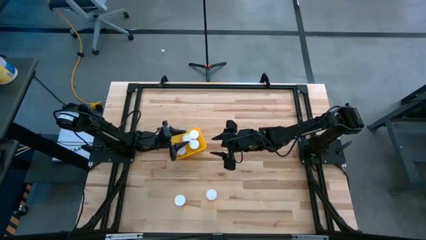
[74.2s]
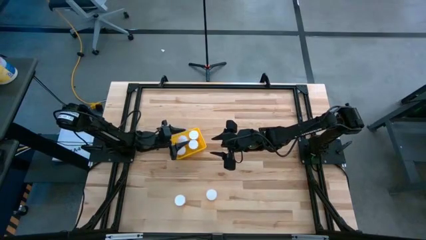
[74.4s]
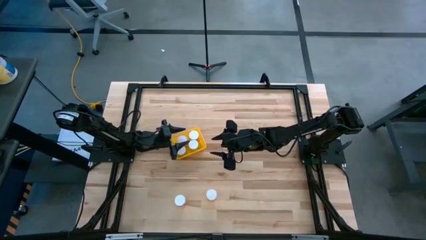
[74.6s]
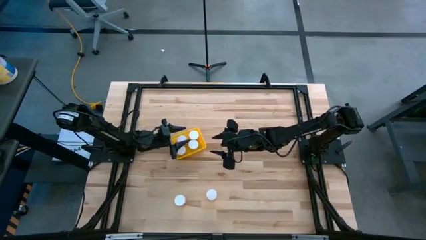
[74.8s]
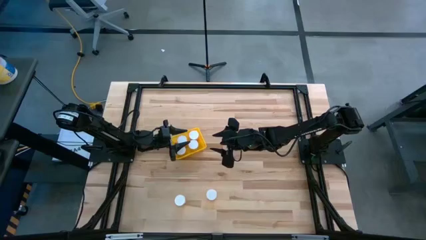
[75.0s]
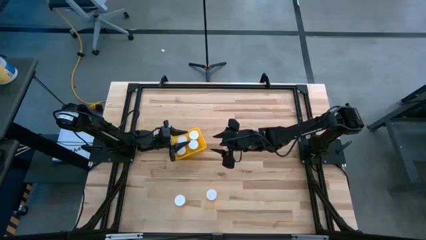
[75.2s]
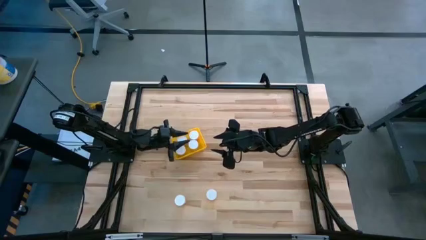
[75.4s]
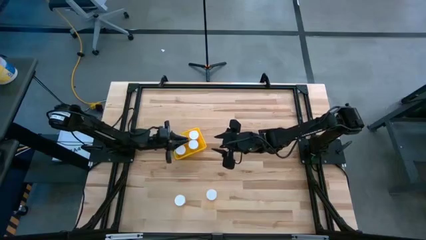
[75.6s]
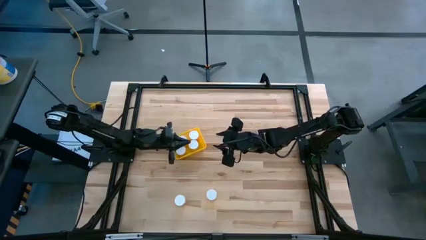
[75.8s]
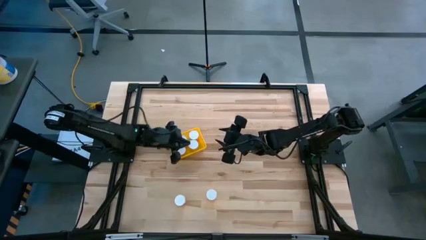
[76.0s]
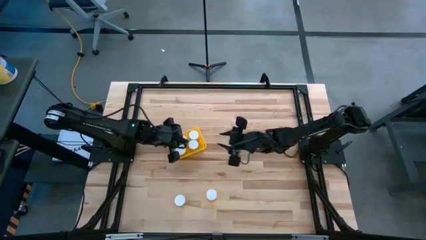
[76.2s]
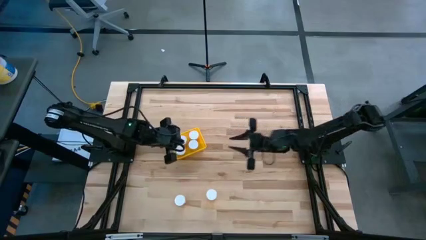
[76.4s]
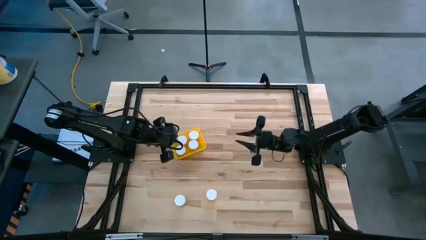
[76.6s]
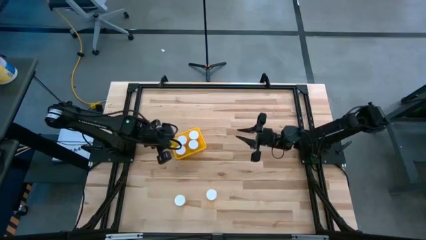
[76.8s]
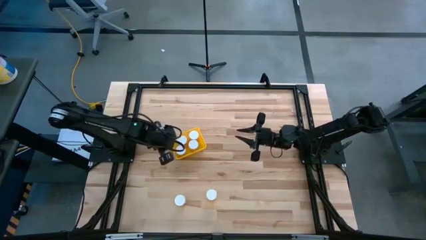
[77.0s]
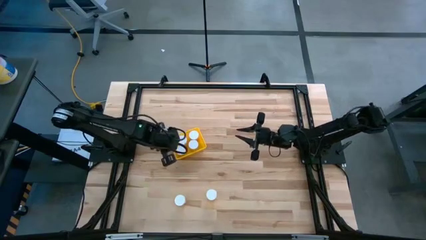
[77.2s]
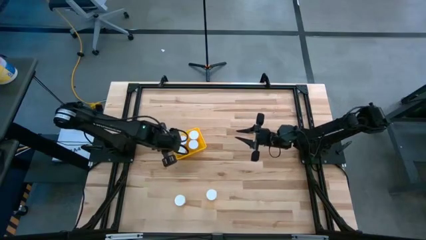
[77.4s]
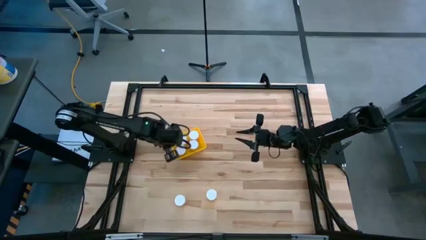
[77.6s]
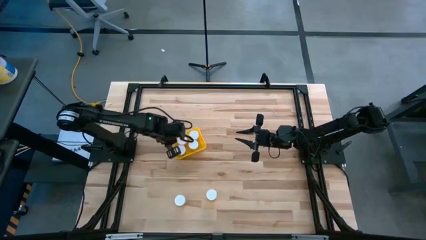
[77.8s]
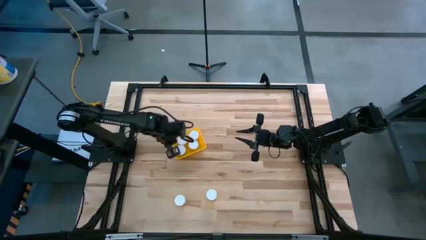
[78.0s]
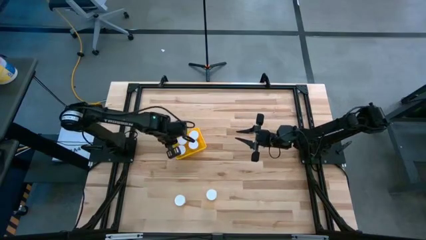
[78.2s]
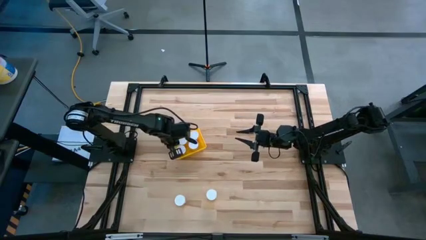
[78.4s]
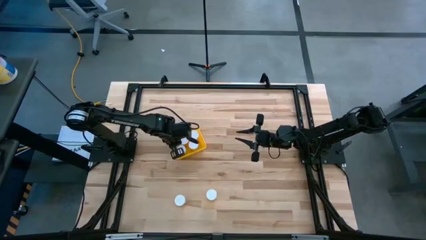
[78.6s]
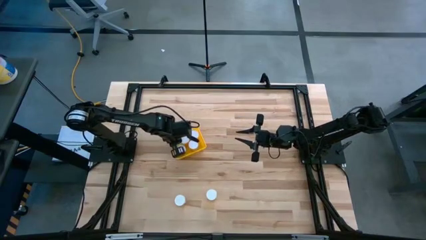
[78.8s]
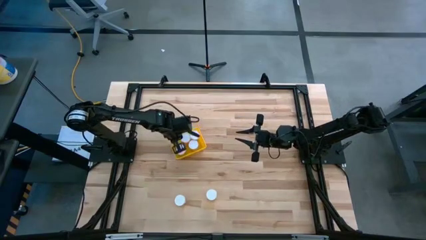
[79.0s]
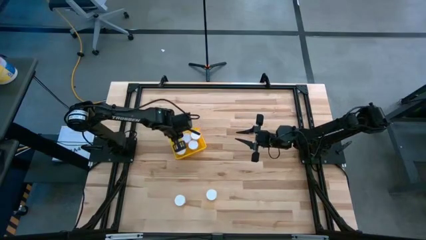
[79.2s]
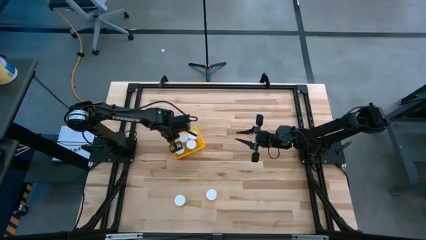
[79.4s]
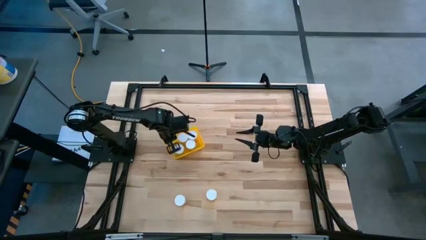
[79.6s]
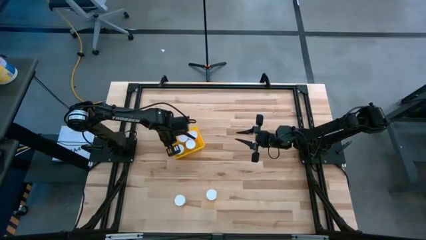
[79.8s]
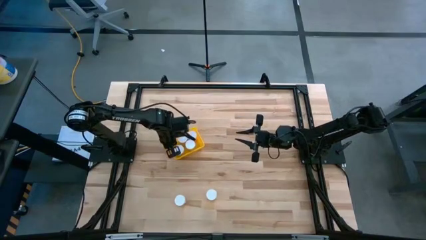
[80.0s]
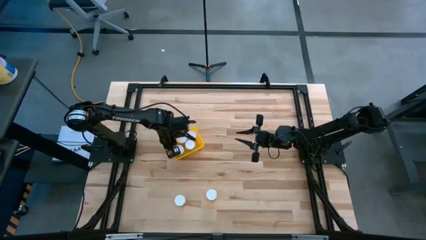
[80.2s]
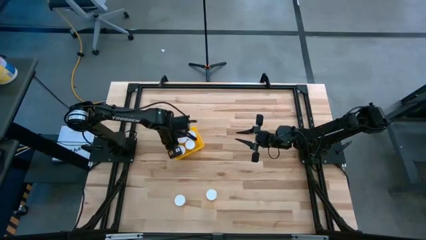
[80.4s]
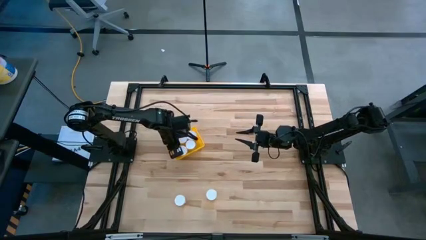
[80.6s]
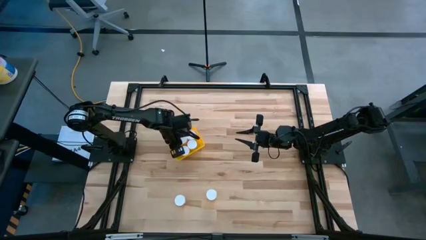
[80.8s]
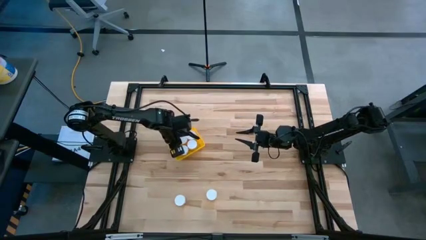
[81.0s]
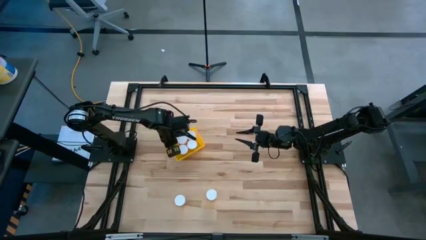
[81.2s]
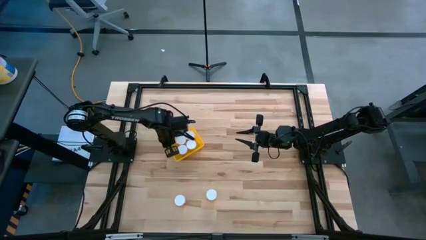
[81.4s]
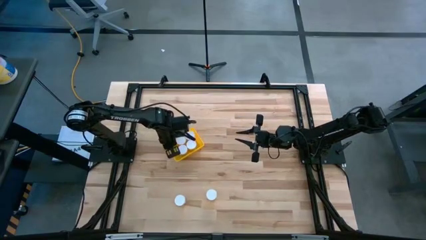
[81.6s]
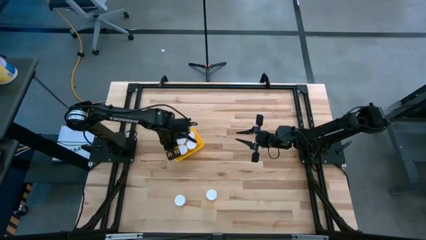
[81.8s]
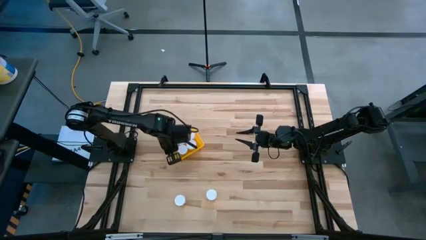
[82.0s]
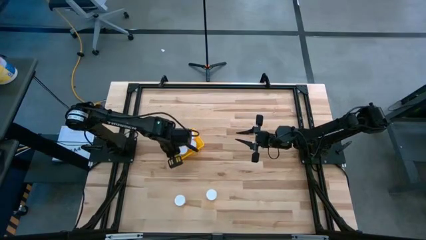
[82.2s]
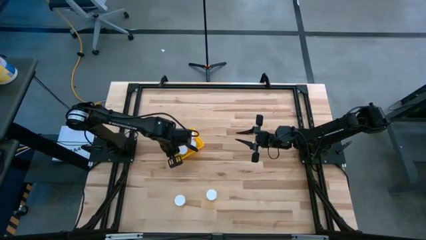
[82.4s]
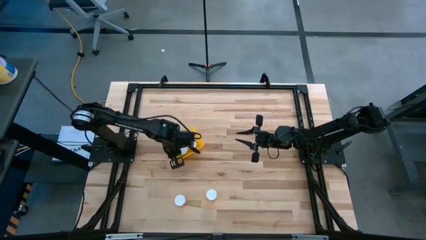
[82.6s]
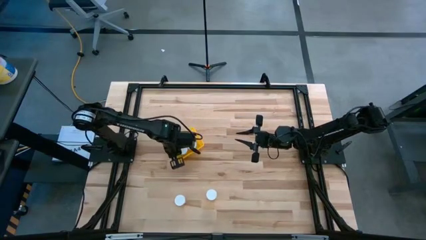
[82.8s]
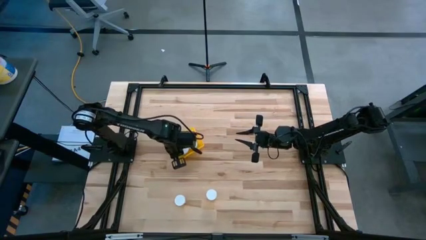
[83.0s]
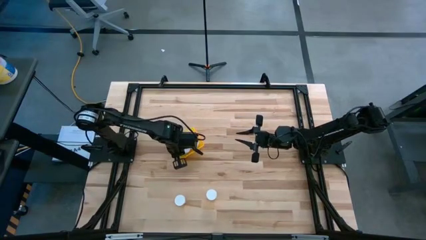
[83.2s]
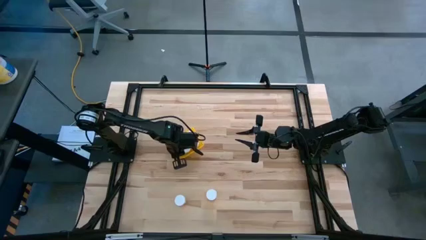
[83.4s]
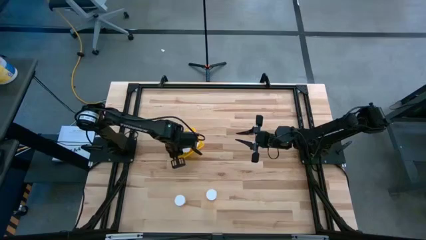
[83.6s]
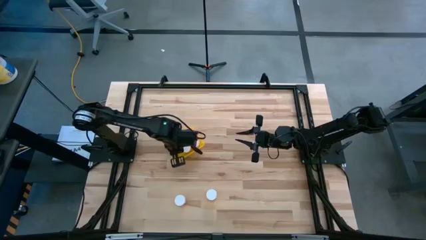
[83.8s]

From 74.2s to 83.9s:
Task: Pick and place pill bottles into a basket
Adjust the orange pill bottles in the yellow basket

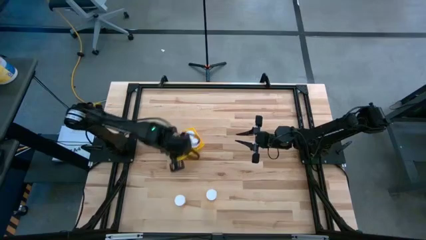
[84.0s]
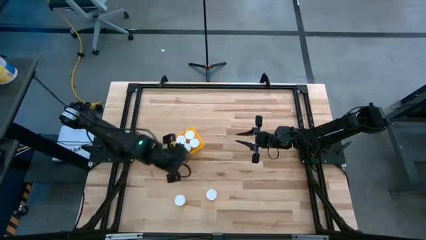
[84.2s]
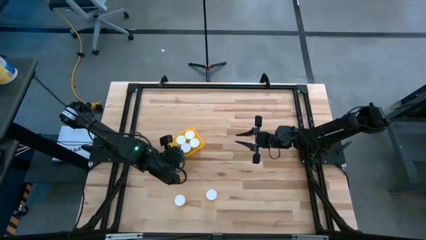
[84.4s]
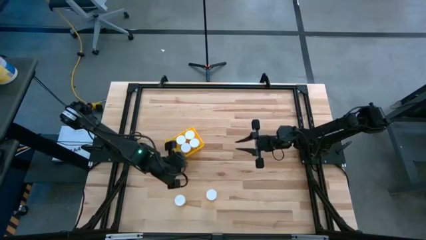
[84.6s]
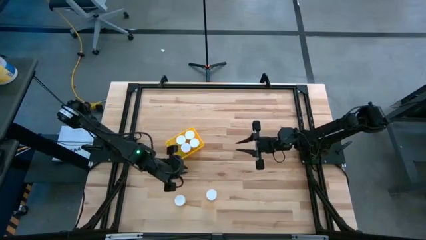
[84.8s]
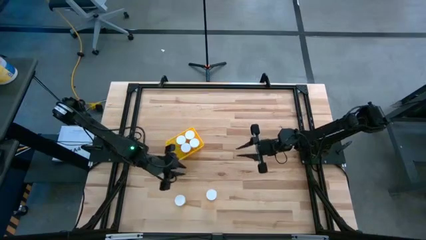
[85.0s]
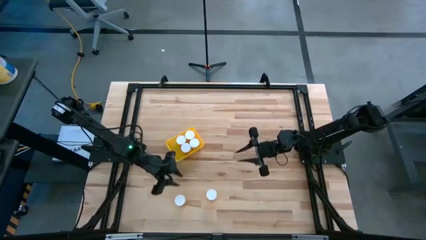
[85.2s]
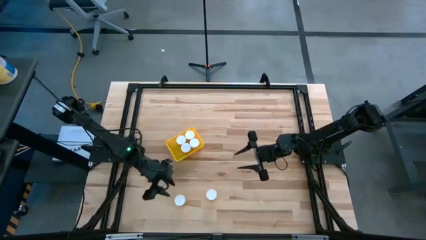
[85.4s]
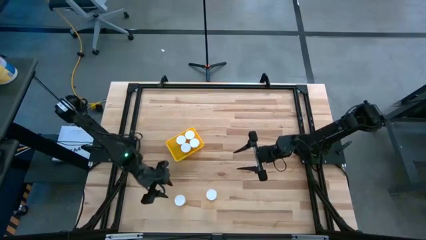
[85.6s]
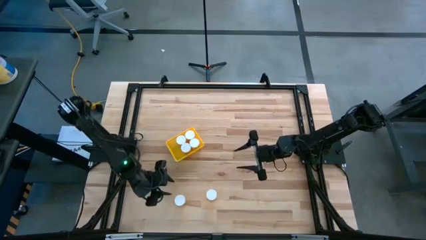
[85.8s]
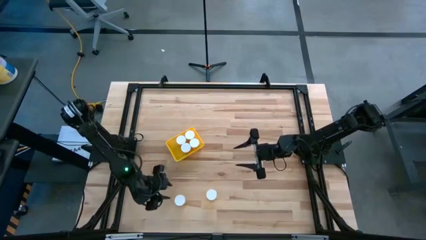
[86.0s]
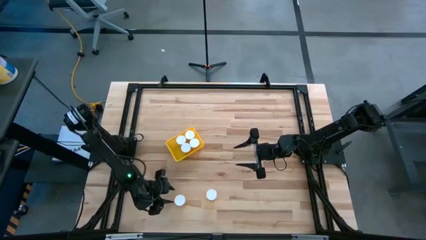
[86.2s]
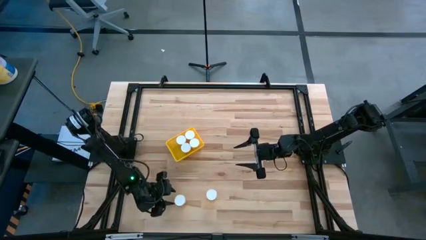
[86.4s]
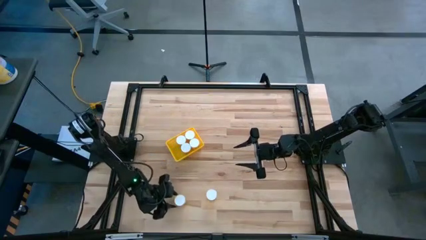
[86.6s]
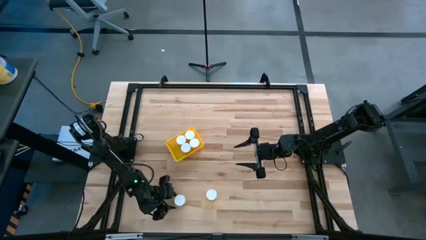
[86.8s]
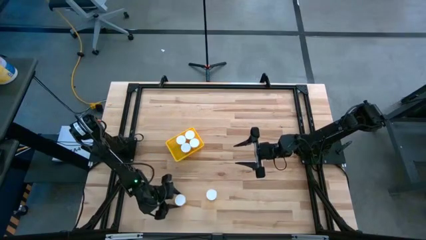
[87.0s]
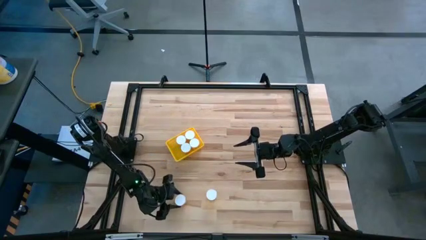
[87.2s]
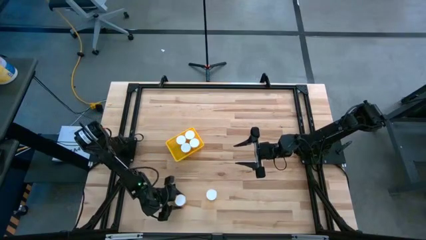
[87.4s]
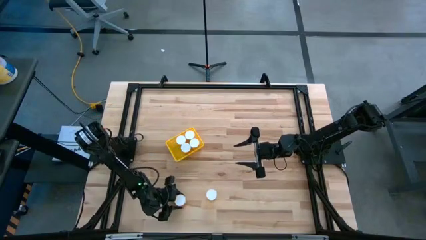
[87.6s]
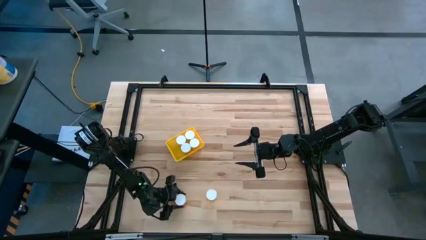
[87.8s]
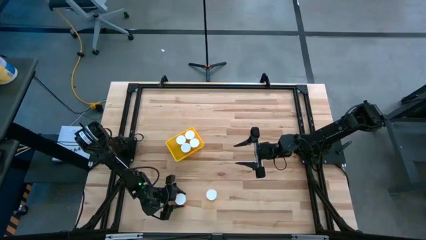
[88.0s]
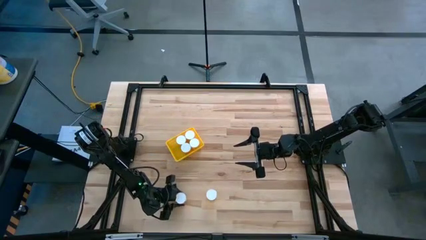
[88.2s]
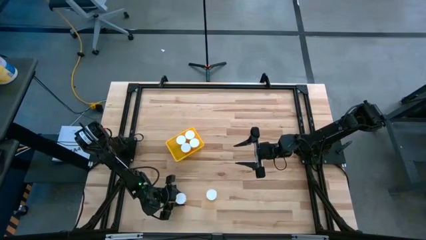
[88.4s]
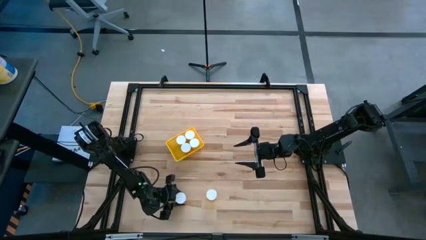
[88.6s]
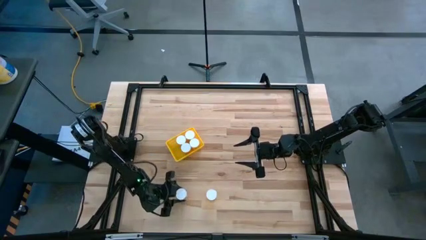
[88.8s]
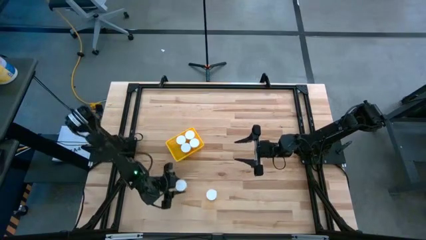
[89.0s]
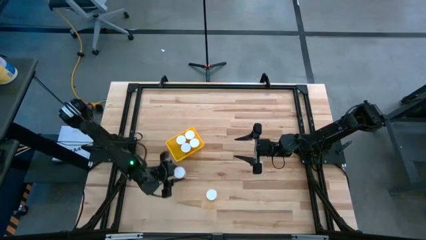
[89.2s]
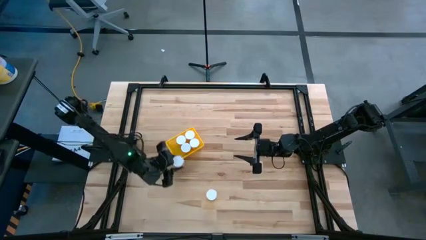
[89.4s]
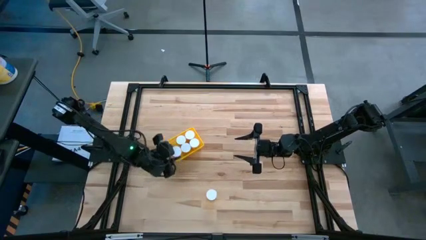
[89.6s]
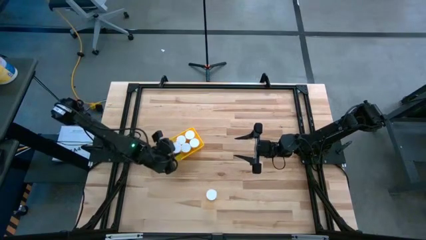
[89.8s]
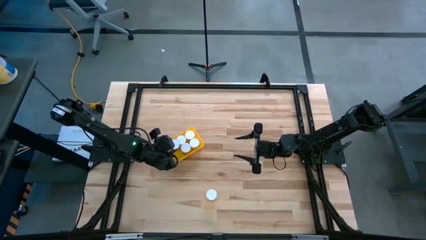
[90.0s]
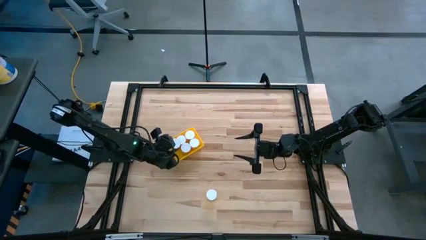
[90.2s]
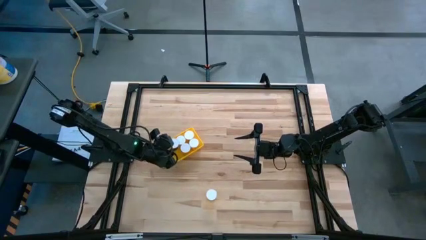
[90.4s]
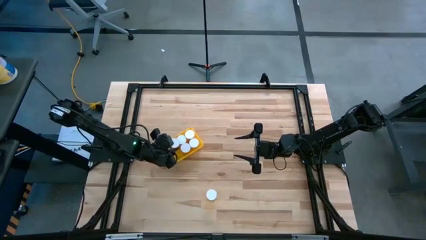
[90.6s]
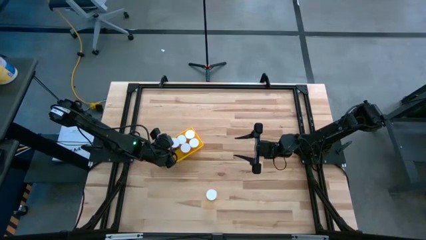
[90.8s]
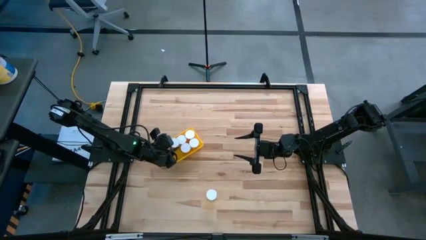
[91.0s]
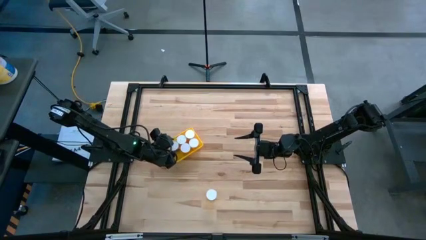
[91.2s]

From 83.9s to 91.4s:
Put the orange pill bottle into the yellow basket
